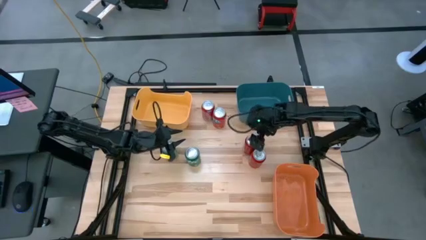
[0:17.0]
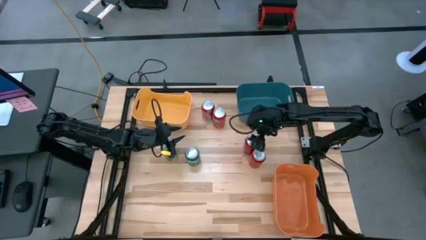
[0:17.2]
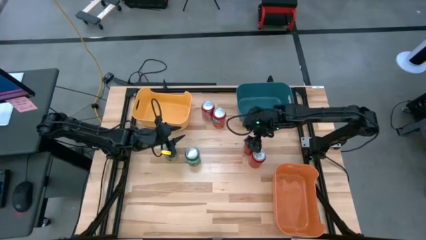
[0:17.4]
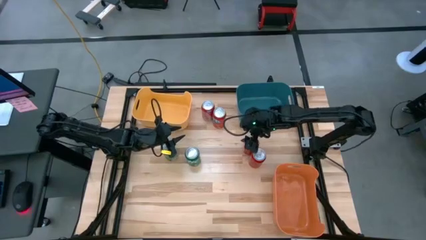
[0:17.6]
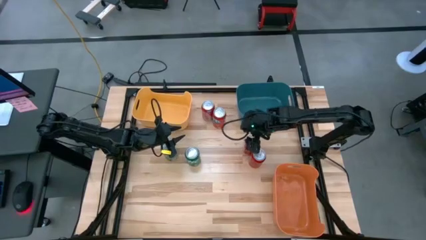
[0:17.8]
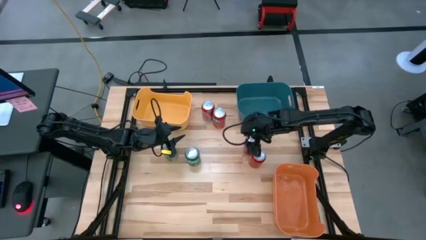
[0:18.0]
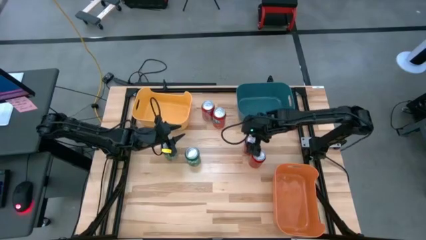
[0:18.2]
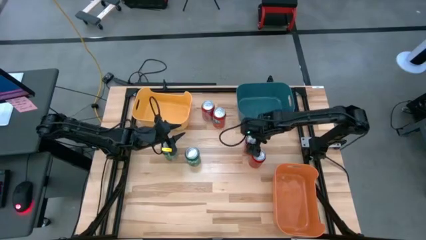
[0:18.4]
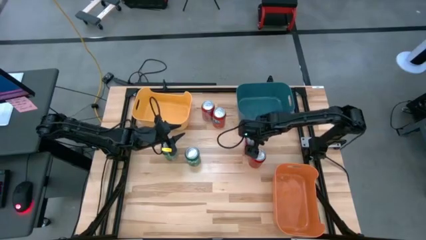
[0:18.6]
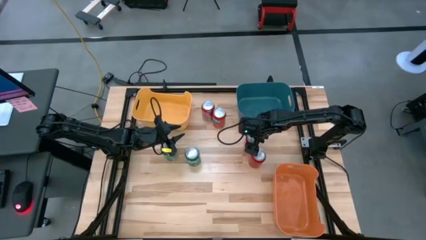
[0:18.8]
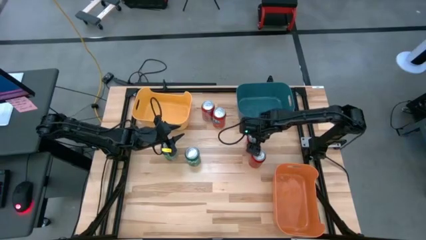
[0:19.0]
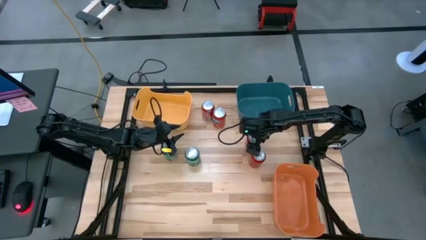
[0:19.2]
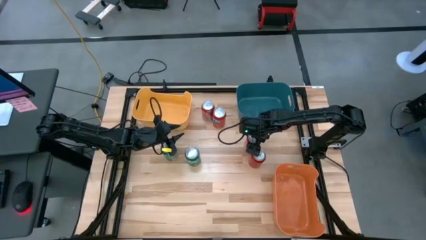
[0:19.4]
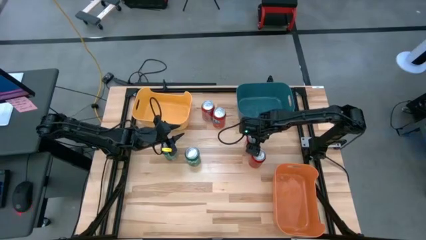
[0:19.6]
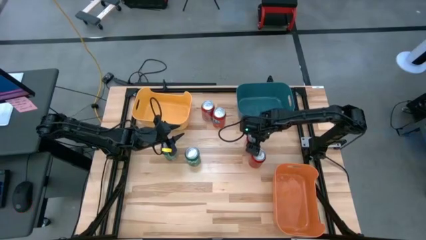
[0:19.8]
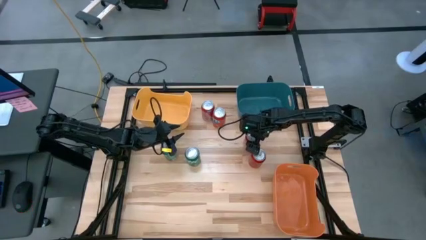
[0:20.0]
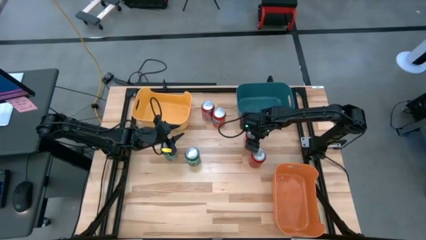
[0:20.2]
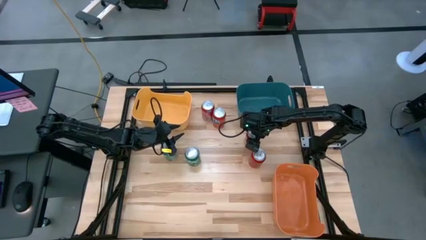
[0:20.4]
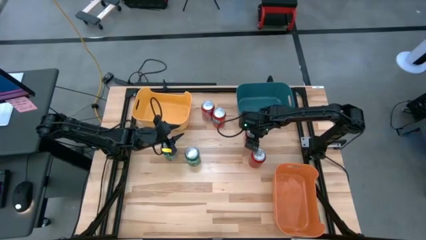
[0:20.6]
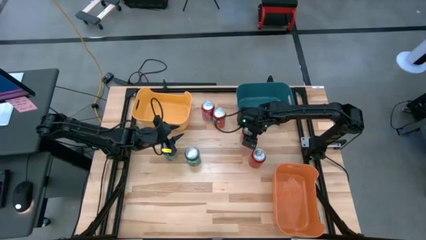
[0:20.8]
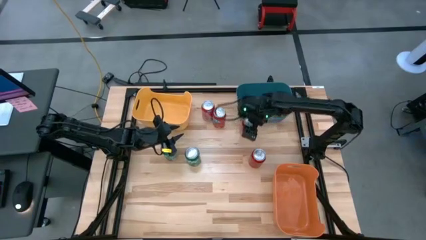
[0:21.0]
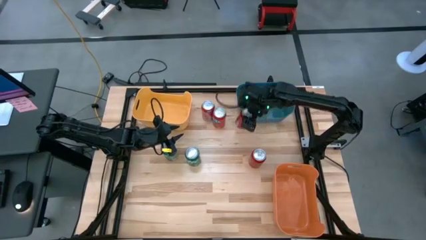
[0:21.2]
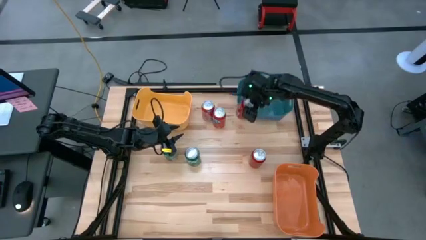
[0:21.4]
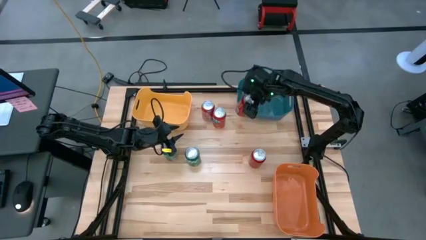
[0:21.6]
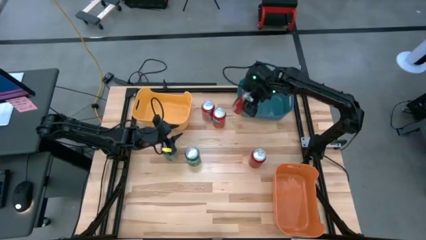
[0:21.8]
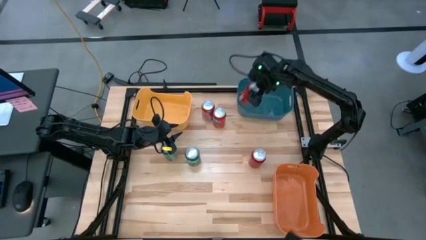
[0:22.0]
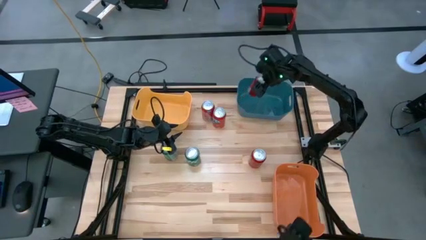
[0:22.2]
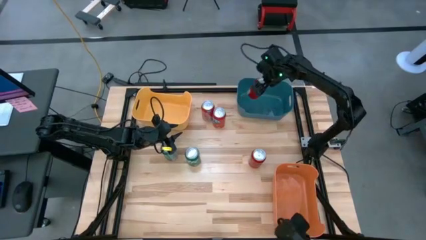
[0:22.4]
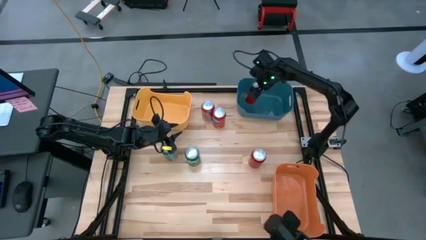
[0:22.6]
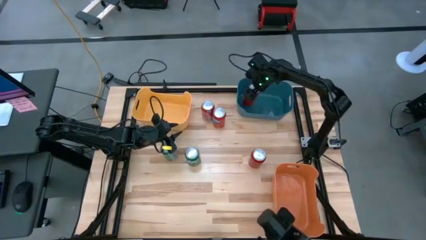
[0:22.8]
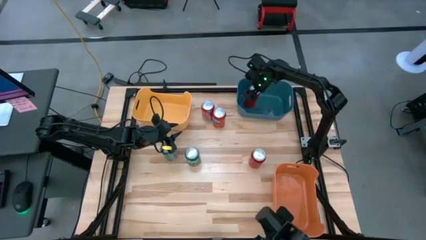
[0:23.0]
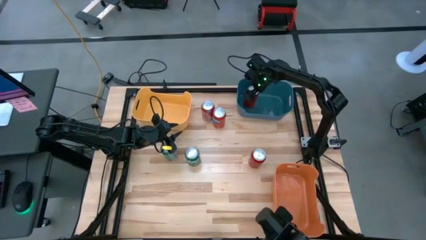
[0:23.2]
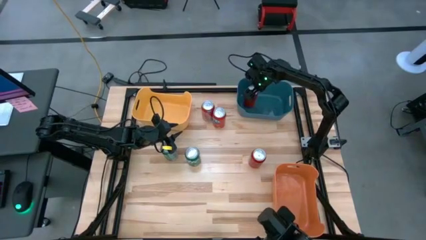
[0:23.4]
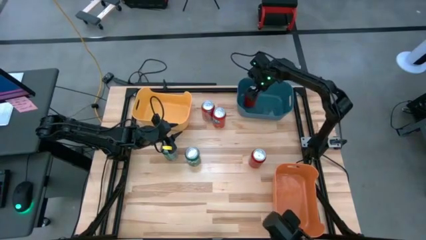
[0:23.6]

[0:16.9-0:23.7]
Task: Sort soda cans
Put the top red-black soda can into the blue bin

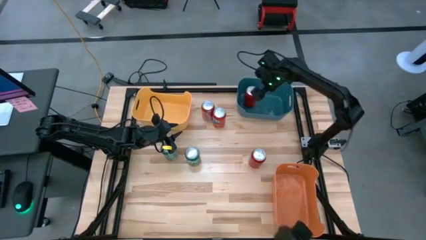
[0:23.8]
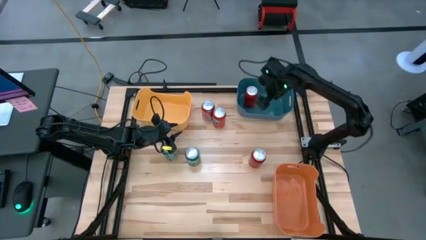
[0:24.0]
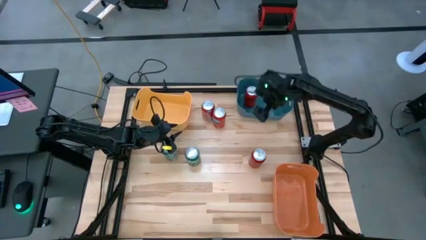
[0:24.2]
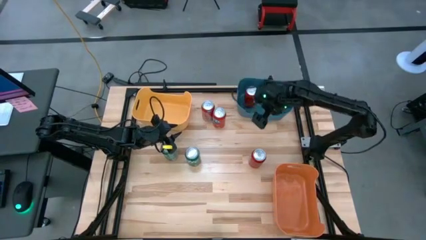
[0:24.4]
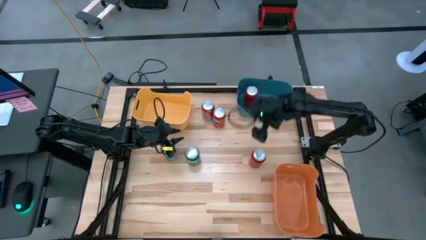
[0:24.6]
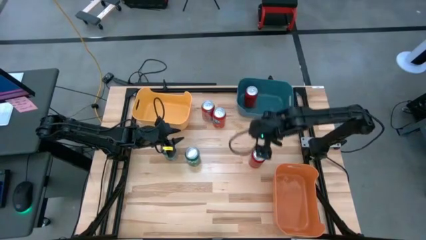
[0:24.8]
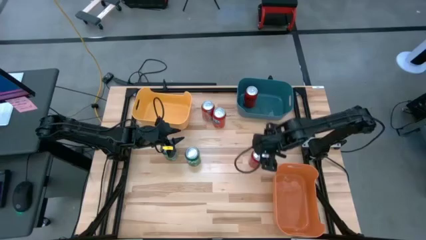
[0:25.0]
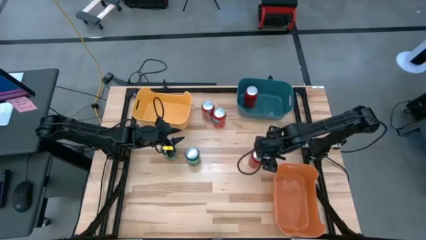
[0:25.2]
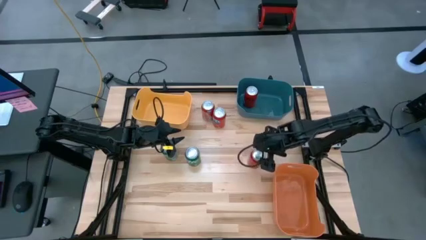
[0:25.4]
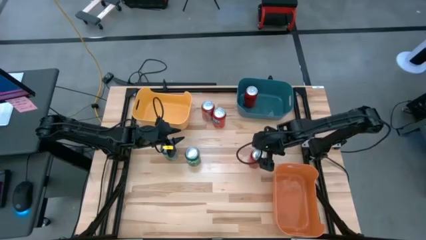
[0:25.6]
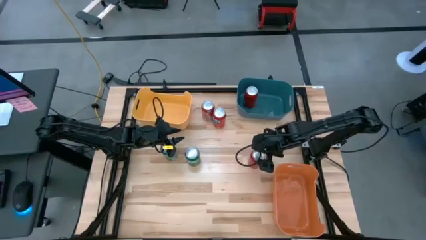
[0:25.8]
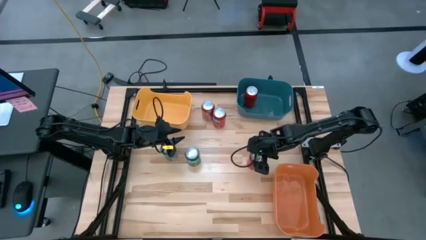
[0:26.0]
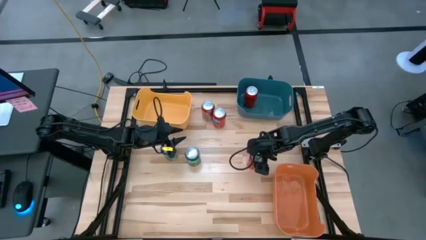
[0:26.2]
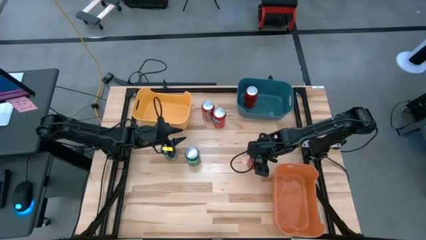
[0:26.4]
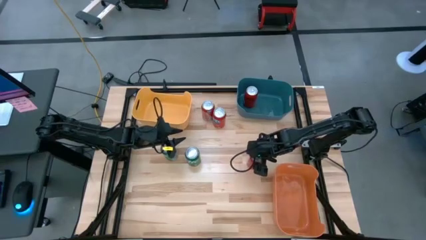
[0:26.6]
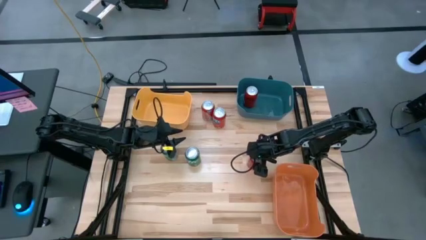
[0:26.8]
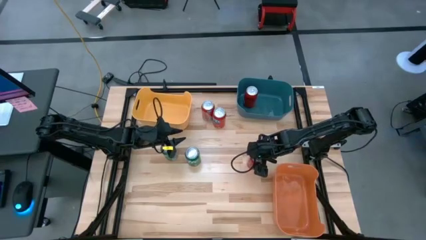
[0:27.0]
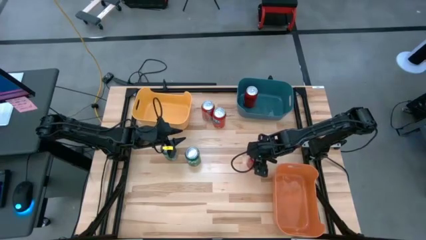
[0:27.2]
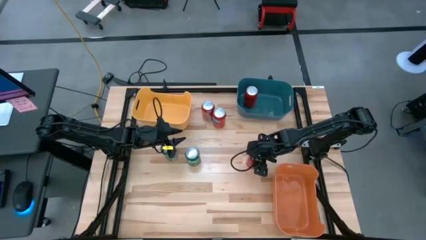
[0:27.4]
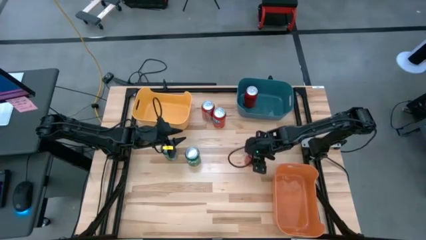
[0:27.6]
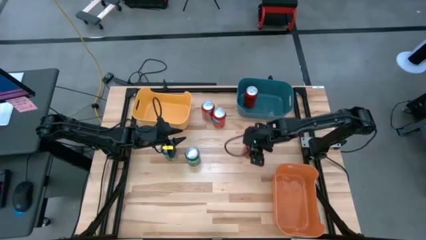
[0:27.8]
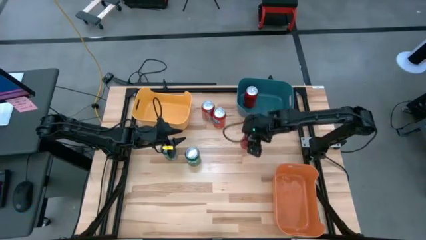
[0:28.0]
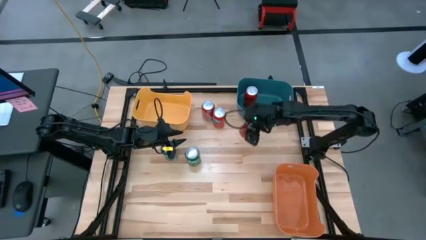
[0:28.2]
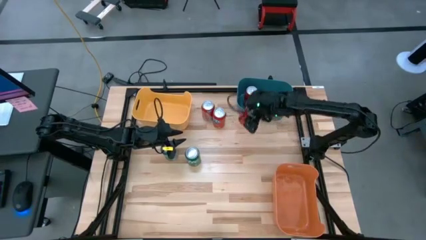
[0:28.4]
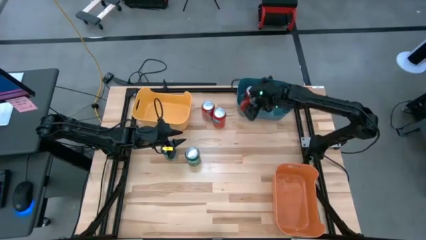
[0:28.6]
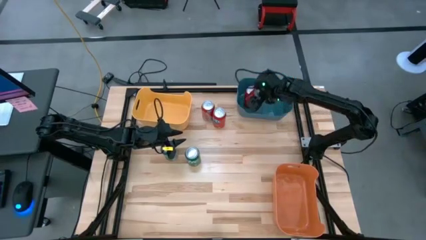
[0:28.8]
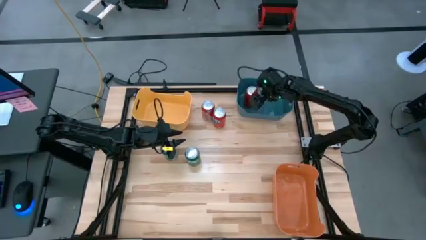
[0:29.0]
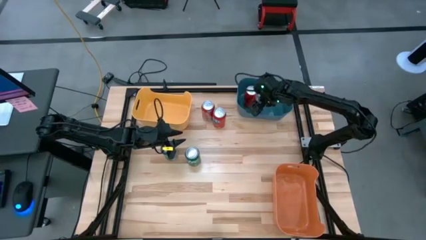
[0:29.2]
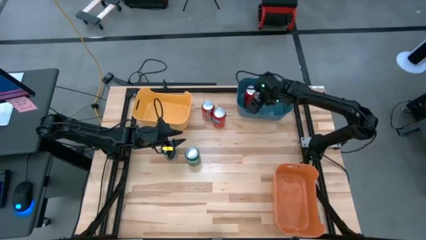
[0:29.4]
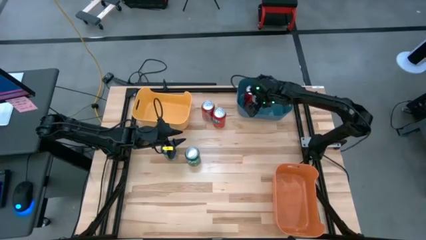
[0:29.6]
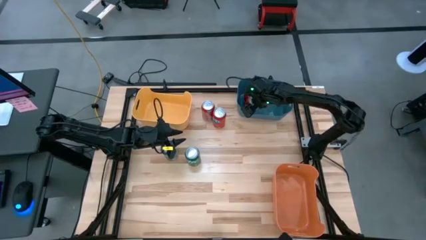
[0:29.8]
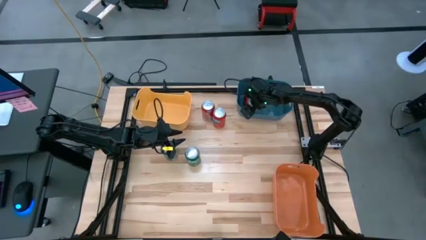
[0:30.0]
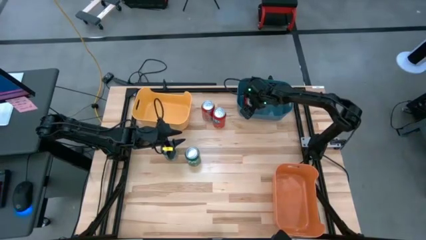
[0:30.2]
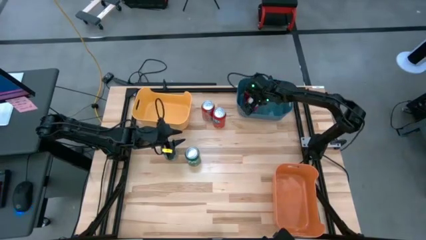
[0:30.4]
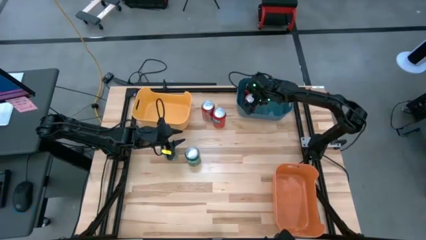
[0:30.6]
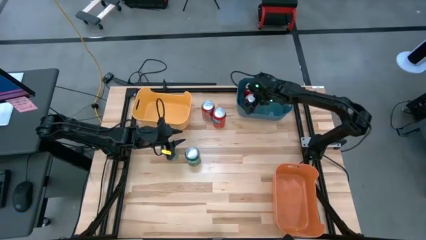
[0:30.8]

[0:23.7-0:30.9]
Put the red-black soda can into the blue bin
